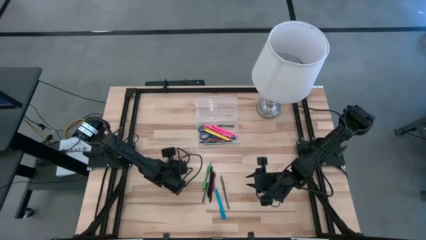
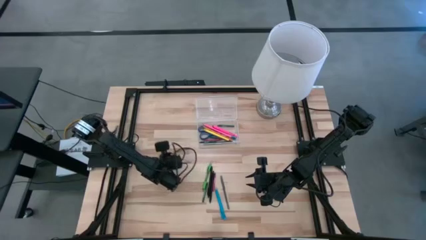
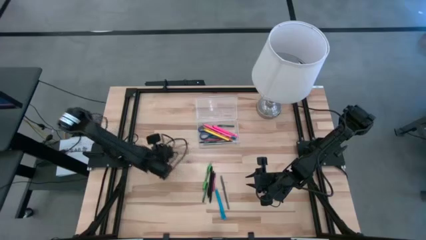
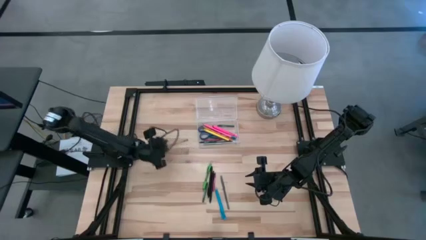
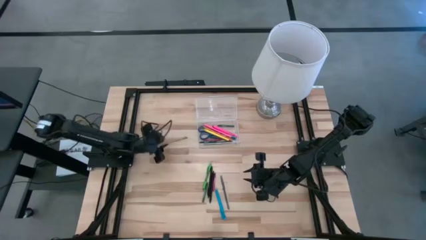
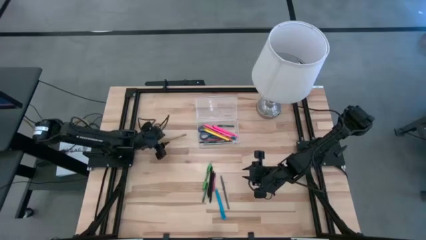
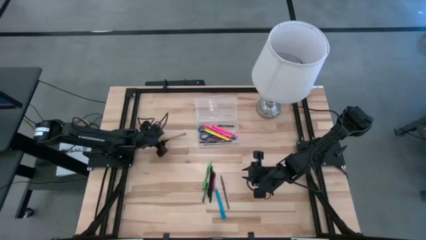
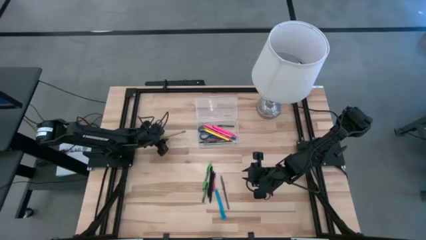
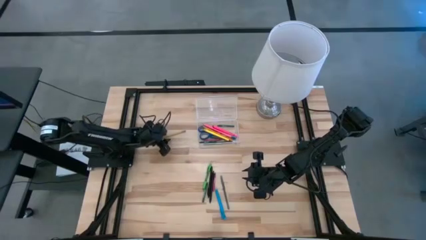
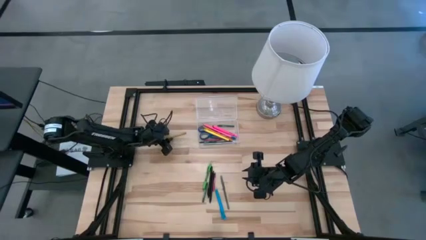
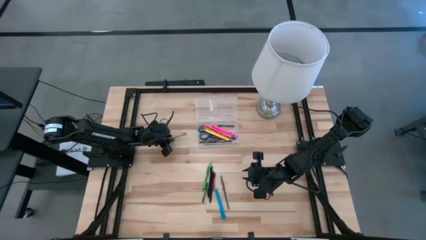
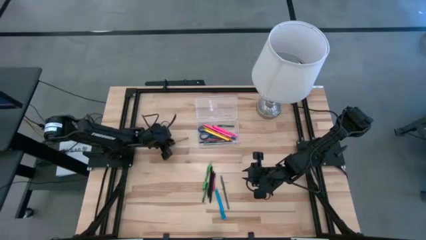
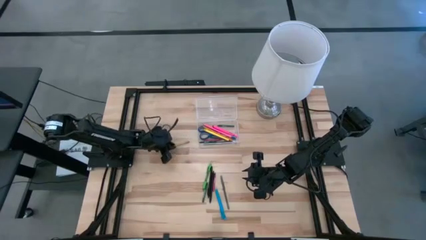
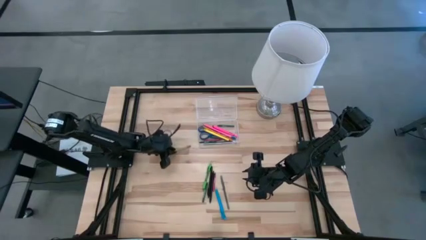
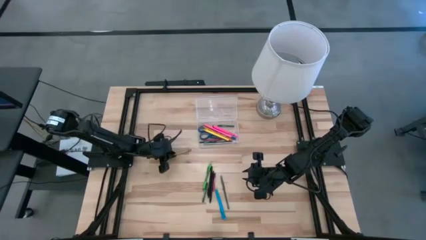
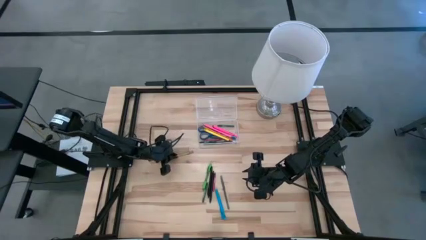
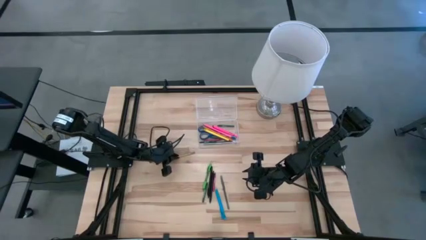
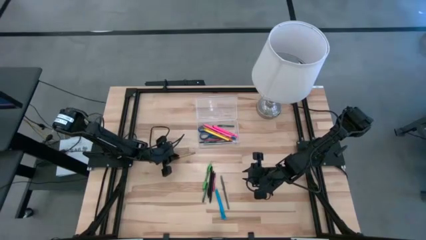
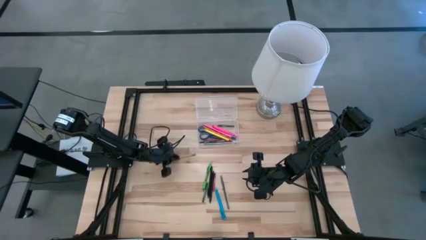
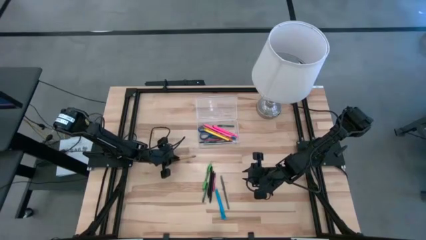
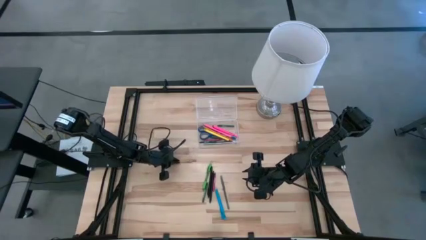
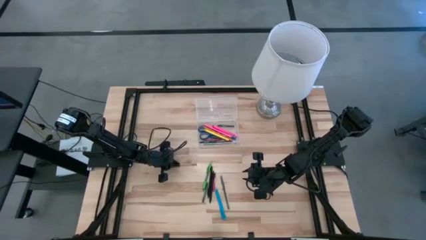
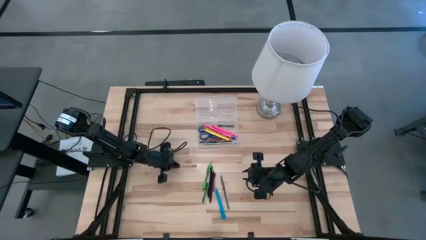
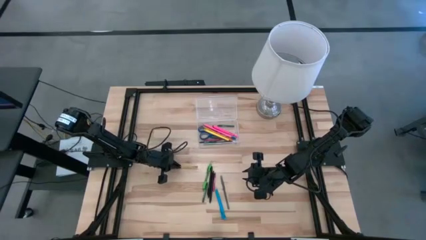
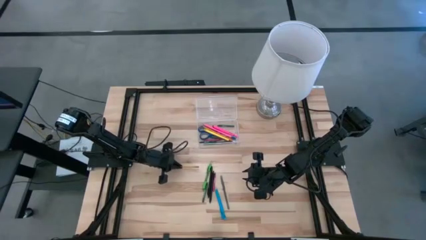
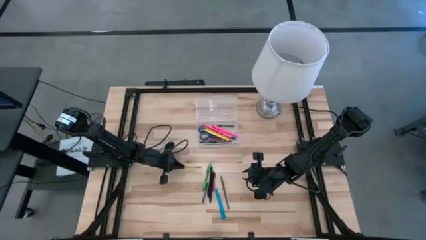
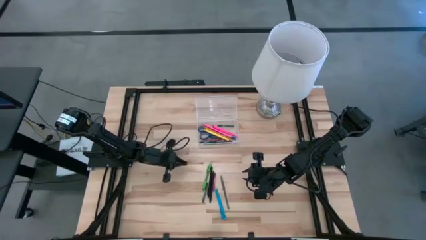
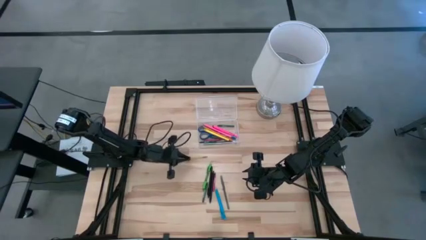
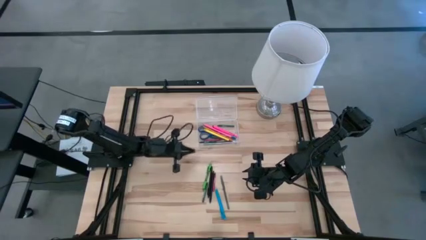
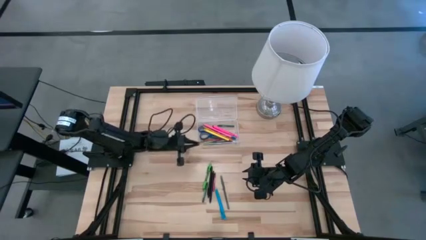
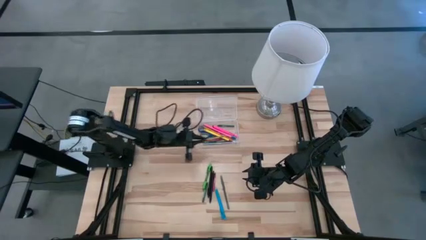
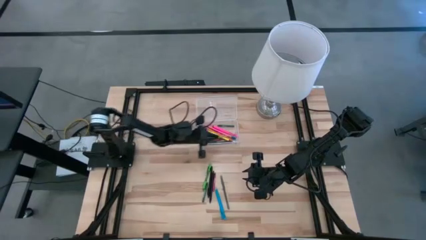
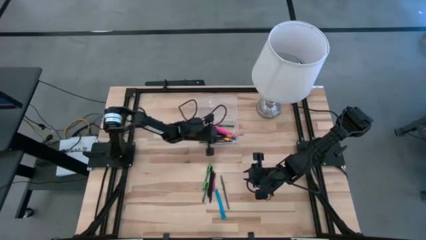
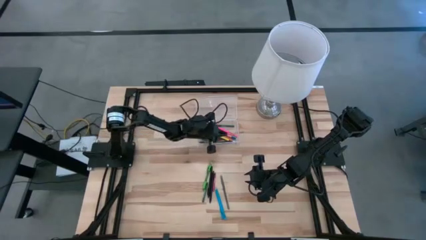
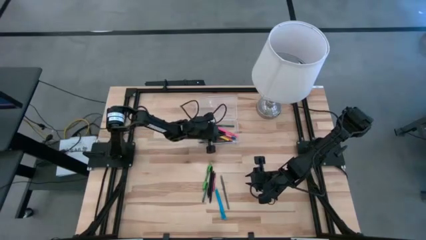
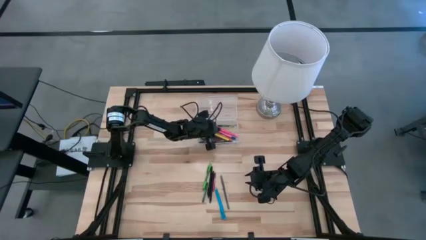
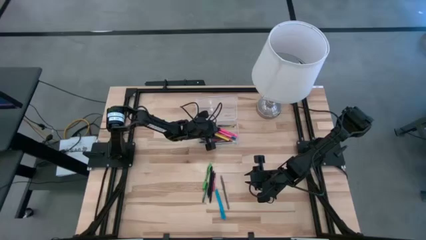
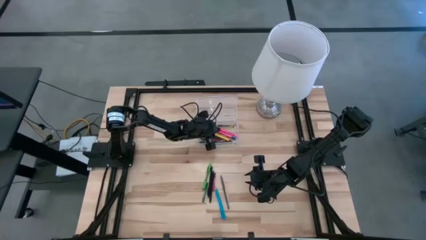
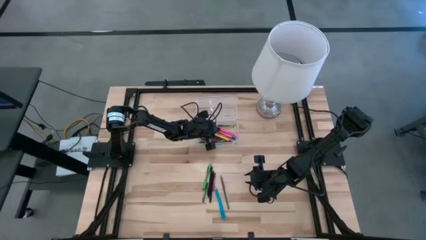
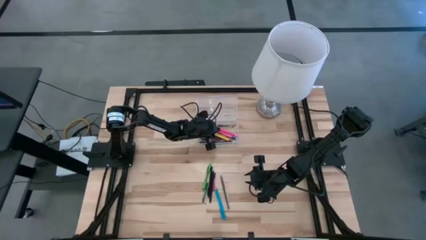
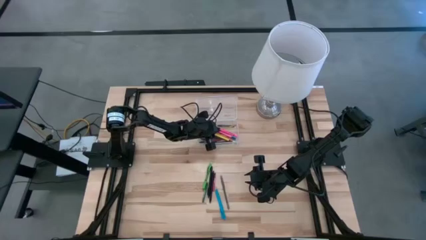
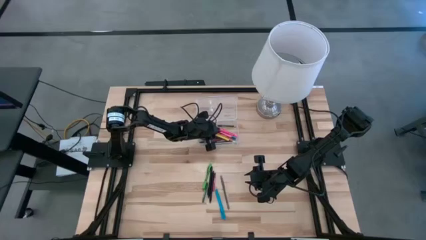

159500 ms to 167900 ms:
Task: Pick & place school supplies into a supply box
Put the yellow pencil into the supply box

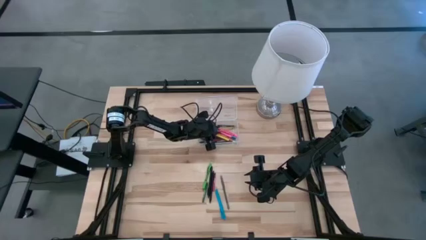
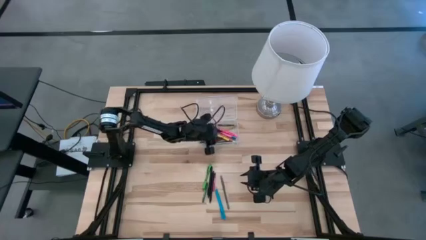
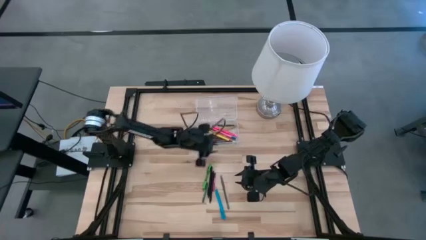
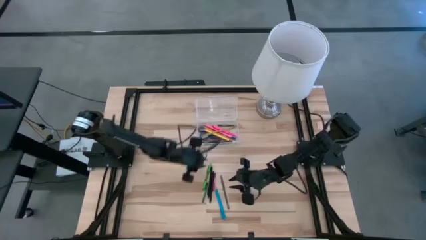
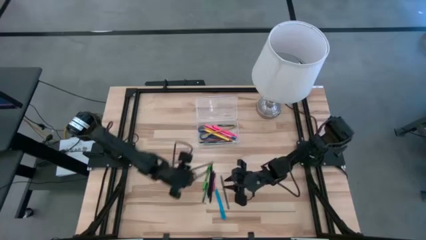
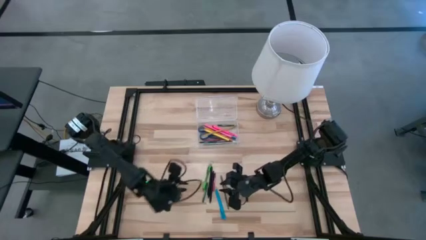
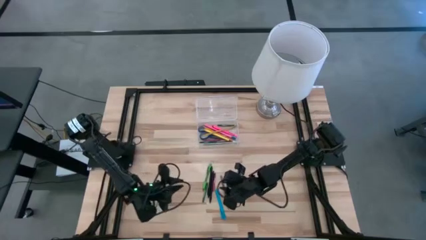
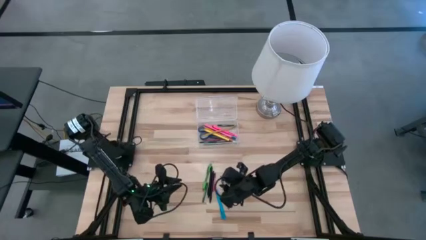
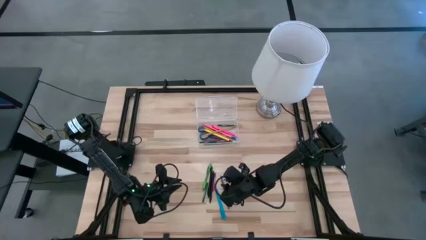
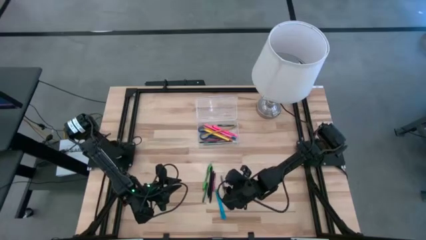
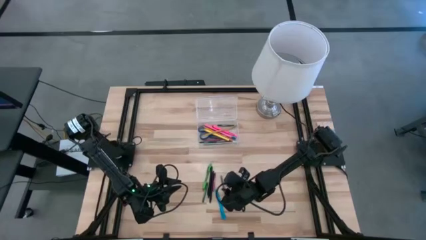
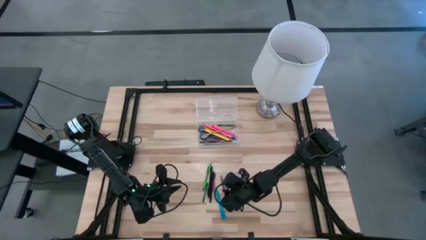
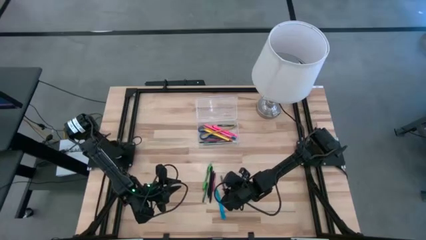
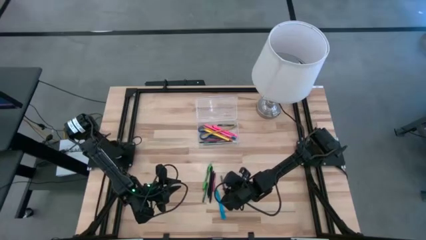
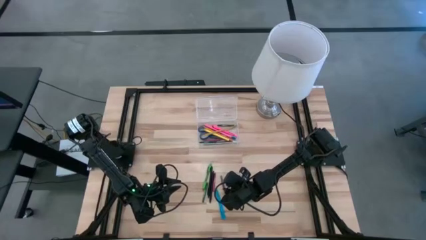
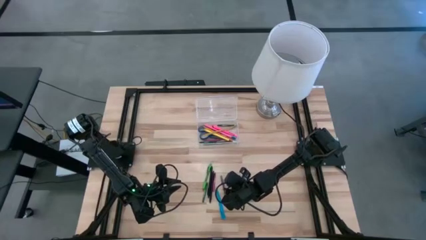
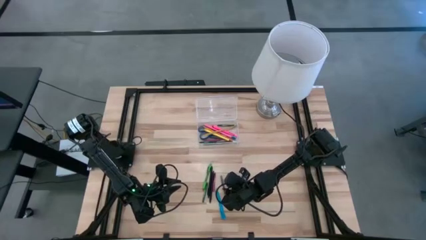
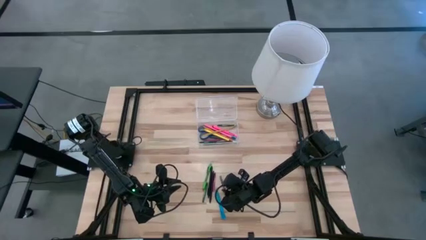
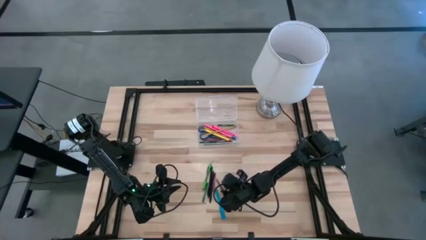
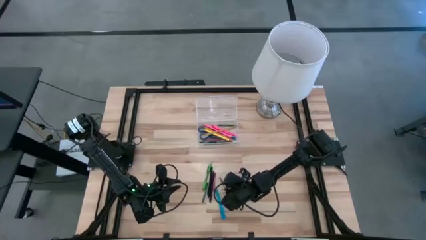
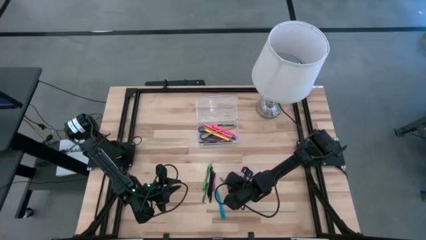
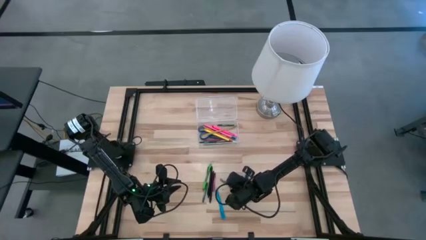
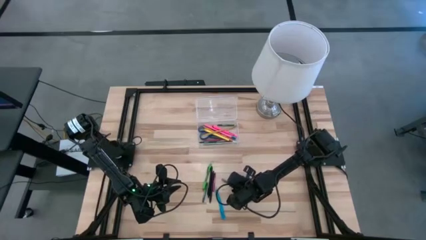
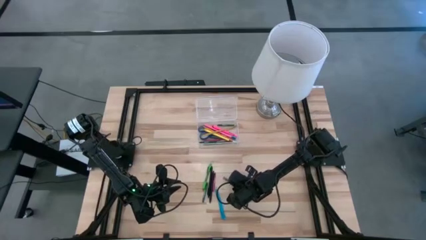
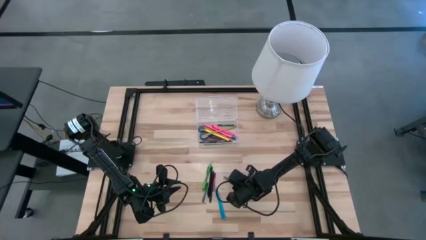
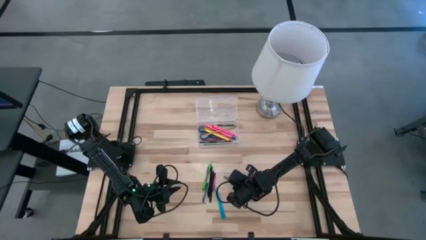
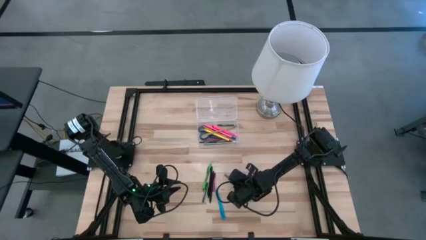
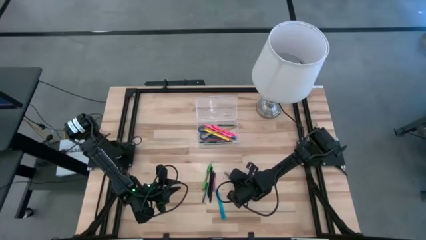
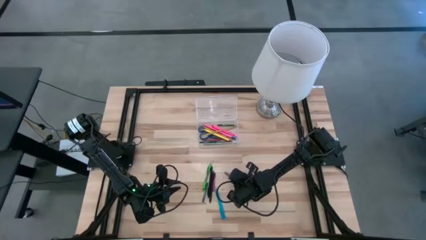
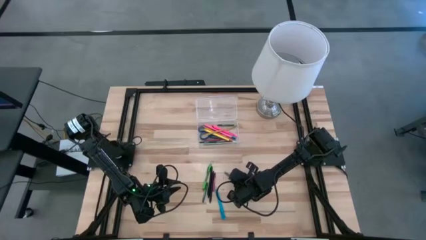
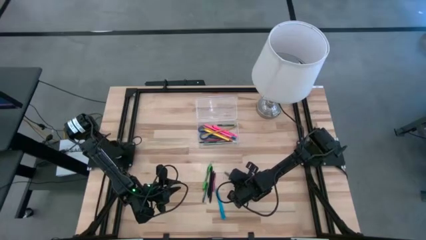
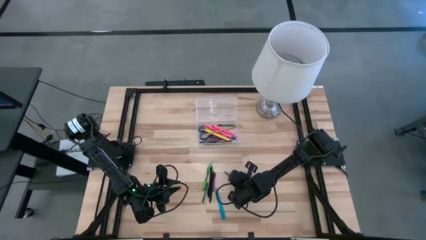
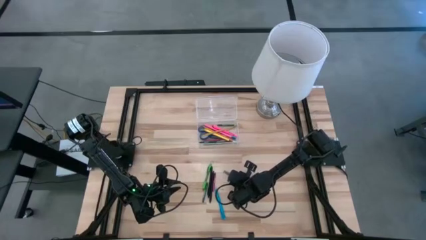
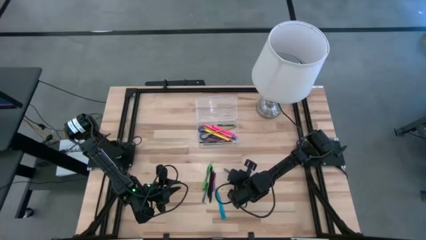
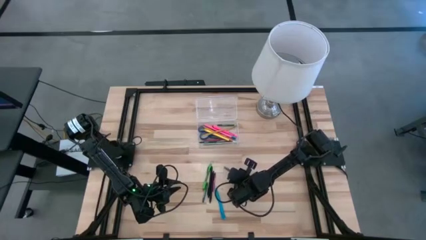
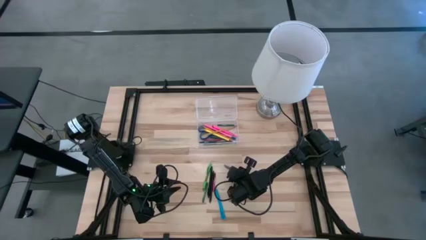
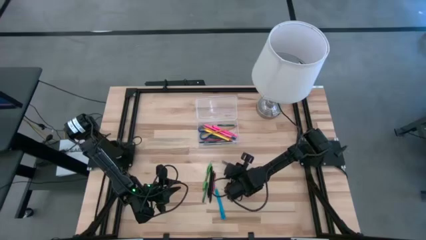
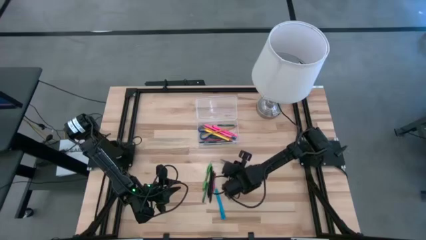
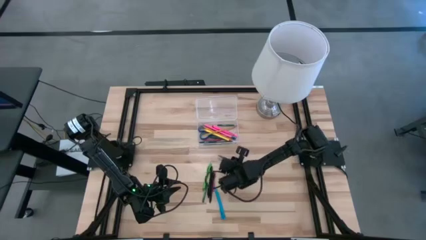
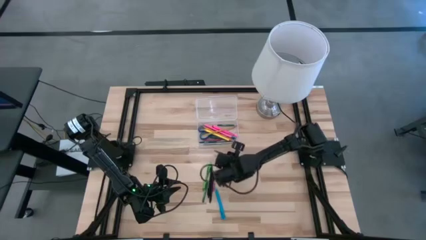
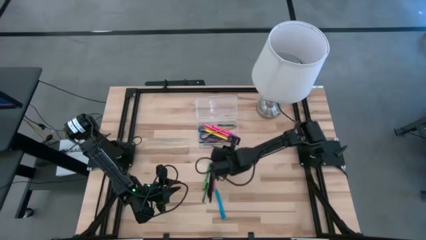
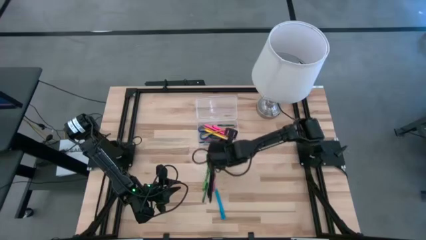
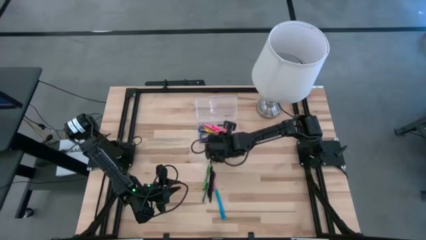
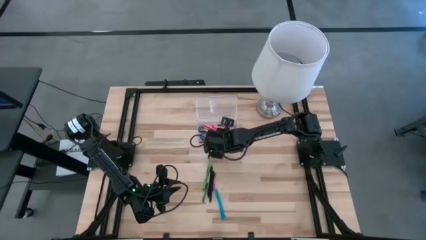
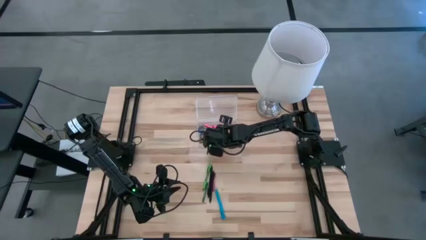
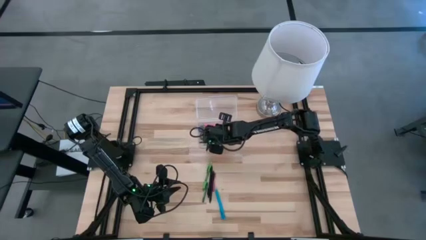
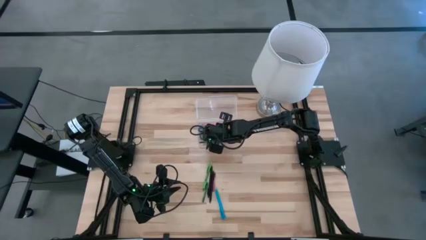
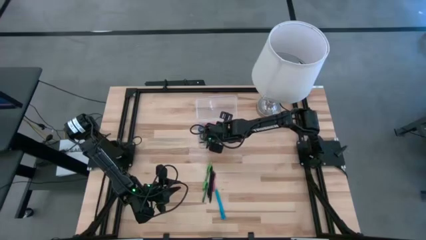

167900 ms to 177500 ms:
Put the grey pen into the supply box
